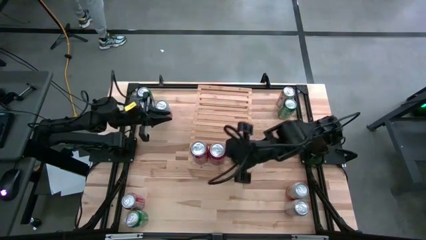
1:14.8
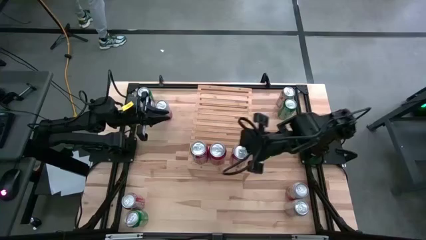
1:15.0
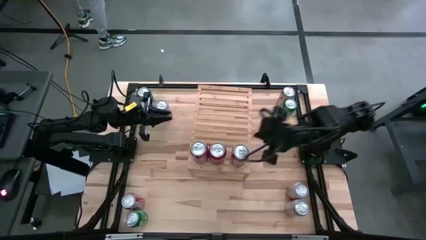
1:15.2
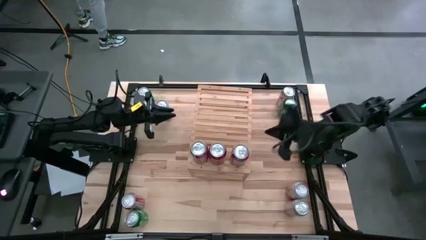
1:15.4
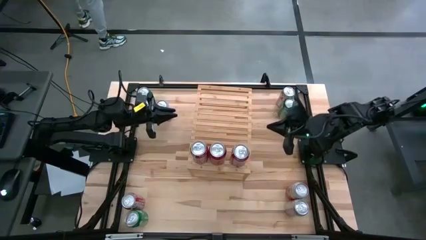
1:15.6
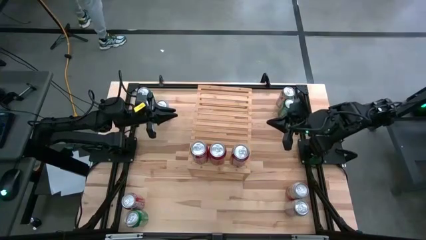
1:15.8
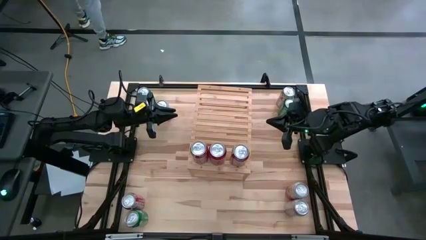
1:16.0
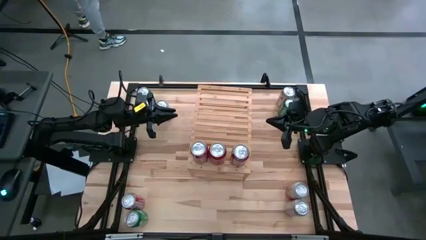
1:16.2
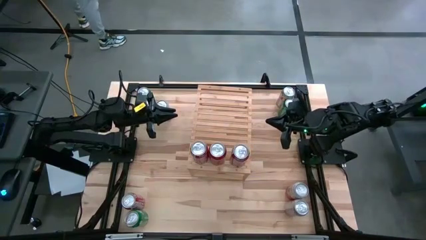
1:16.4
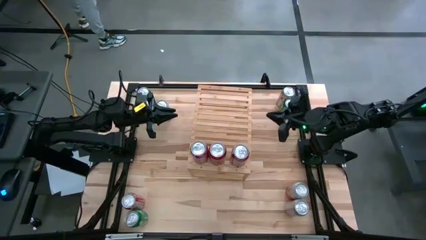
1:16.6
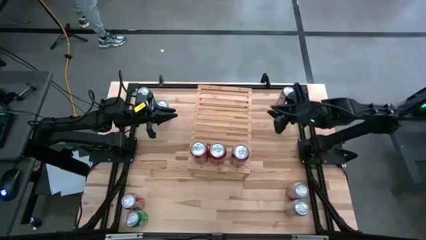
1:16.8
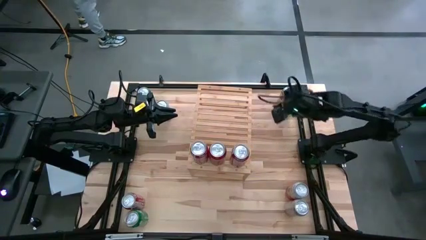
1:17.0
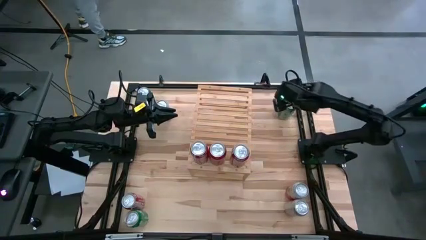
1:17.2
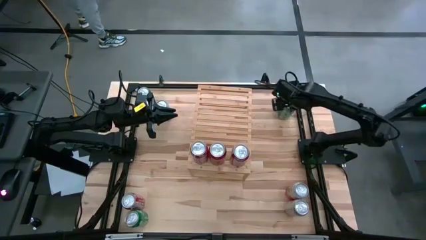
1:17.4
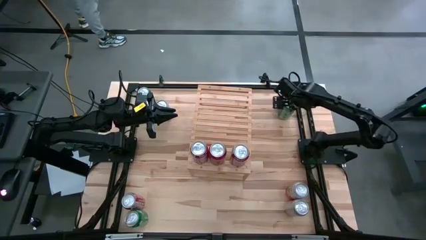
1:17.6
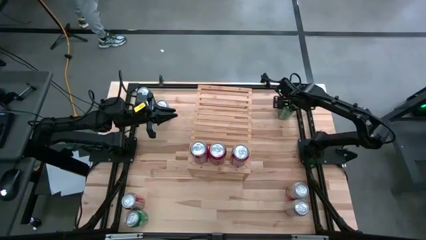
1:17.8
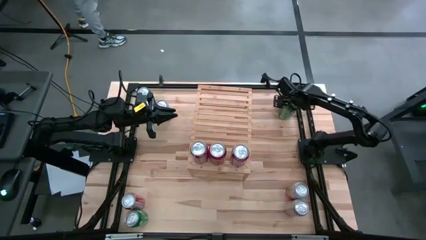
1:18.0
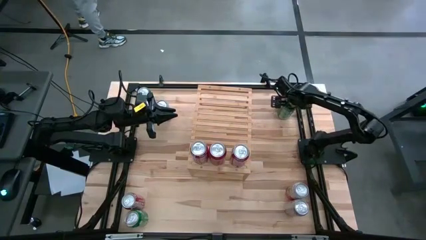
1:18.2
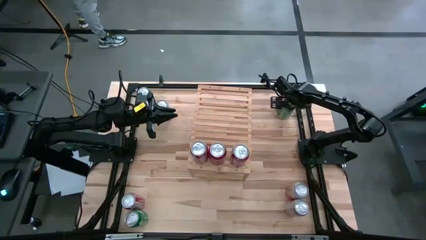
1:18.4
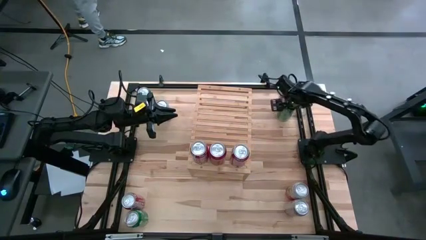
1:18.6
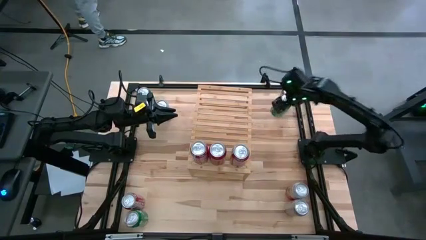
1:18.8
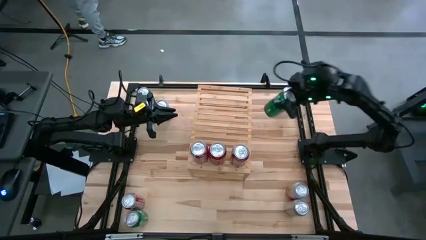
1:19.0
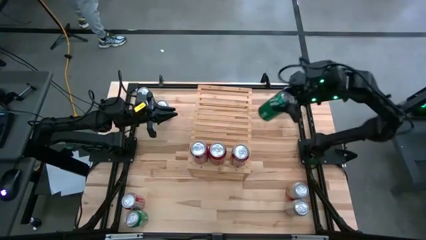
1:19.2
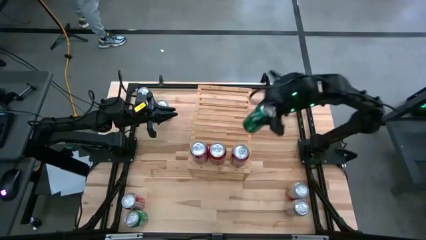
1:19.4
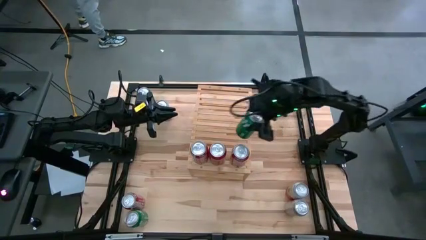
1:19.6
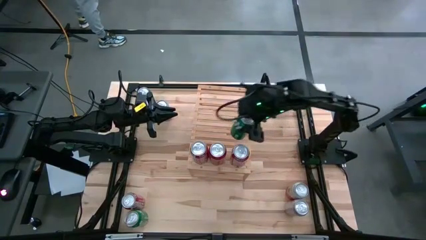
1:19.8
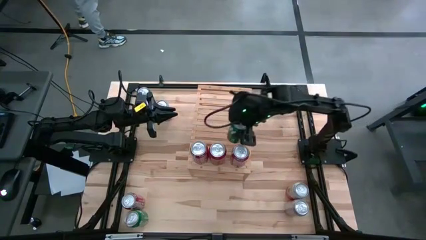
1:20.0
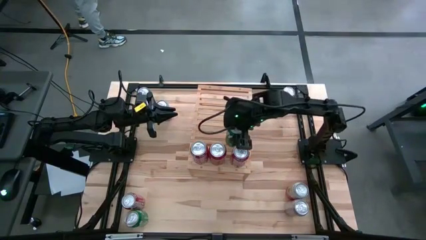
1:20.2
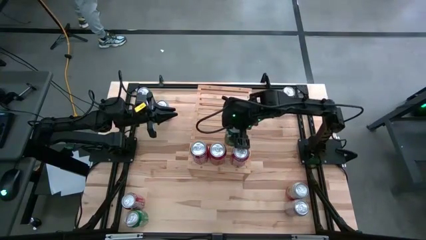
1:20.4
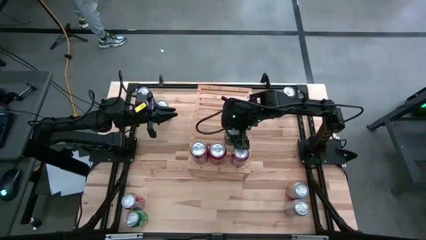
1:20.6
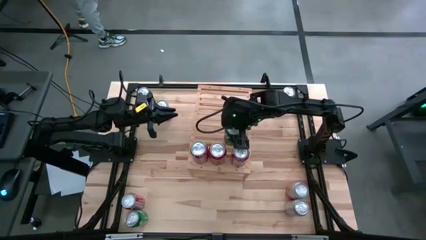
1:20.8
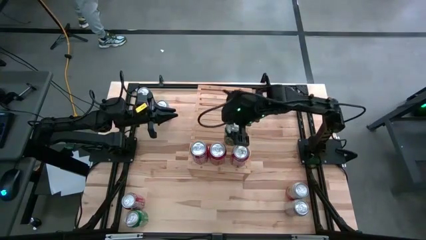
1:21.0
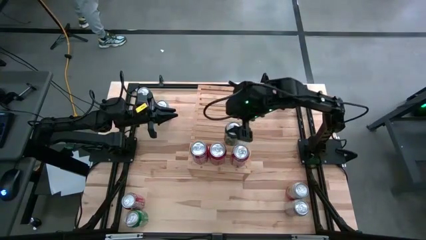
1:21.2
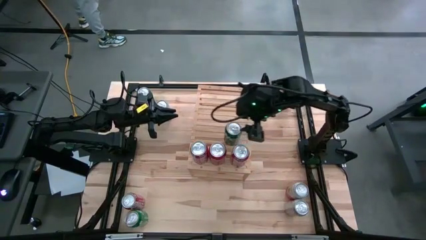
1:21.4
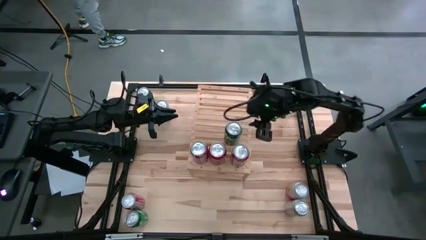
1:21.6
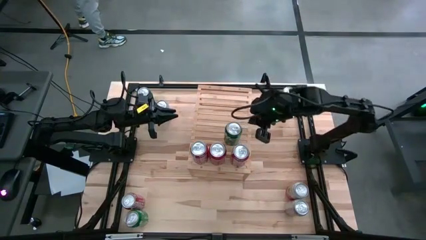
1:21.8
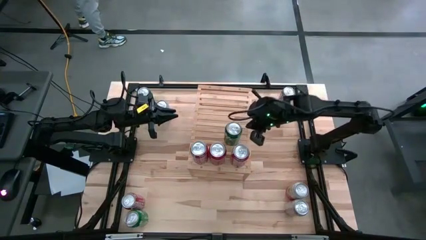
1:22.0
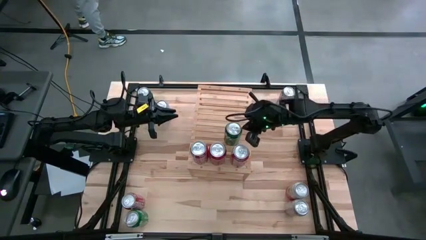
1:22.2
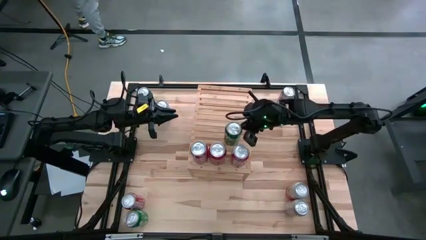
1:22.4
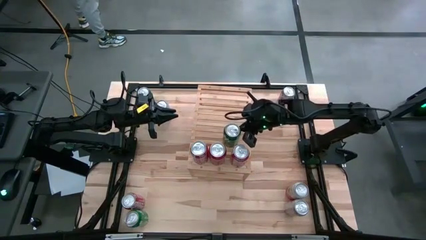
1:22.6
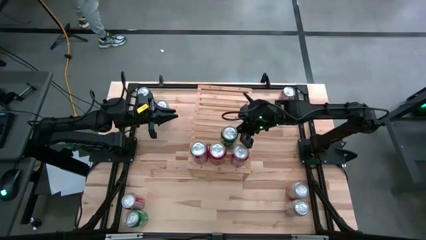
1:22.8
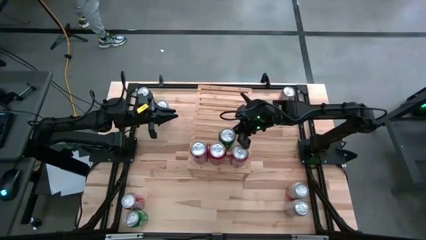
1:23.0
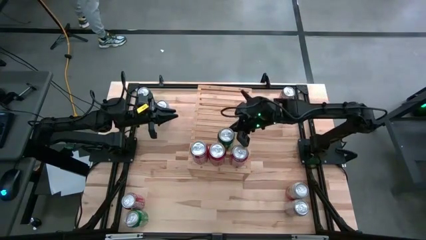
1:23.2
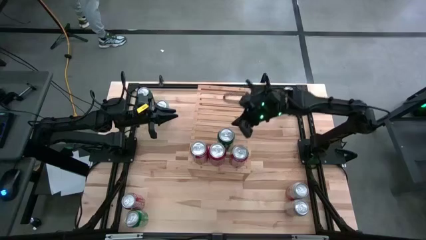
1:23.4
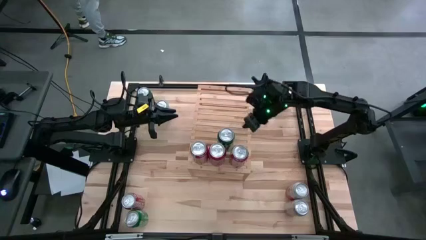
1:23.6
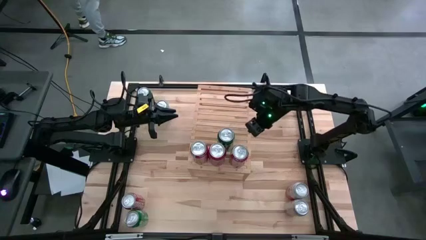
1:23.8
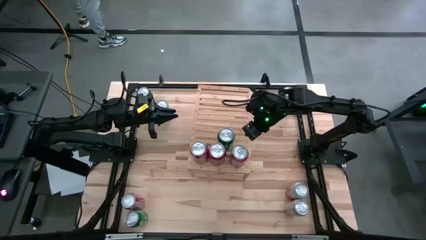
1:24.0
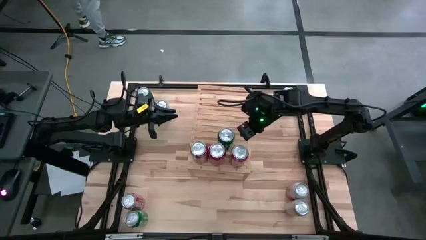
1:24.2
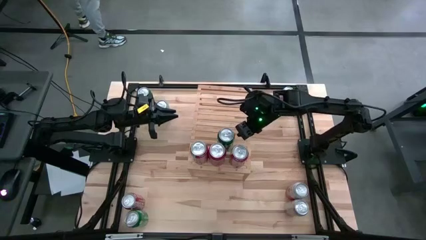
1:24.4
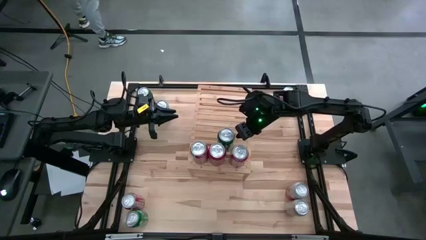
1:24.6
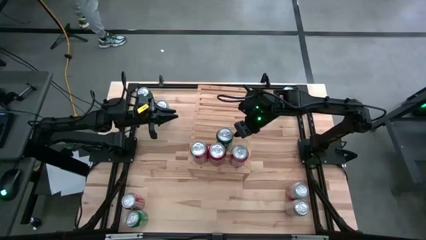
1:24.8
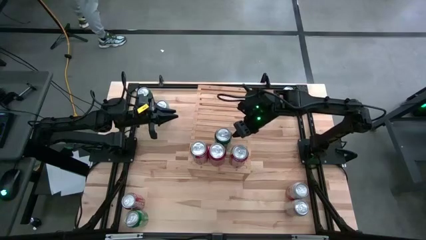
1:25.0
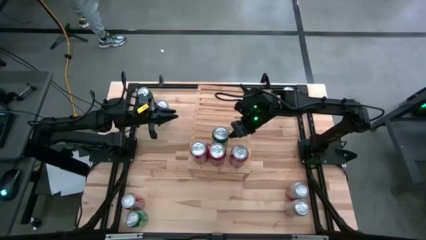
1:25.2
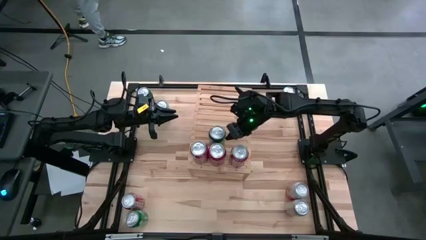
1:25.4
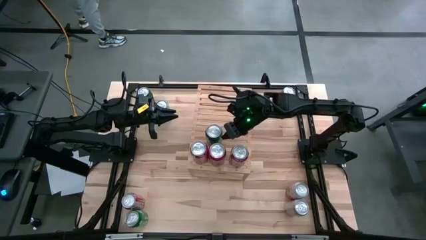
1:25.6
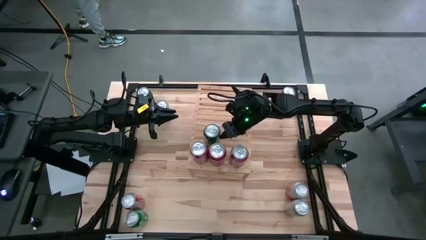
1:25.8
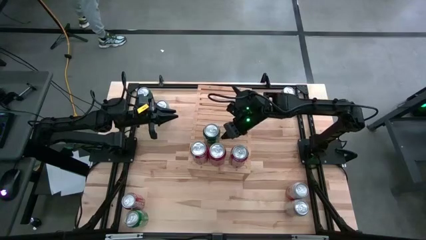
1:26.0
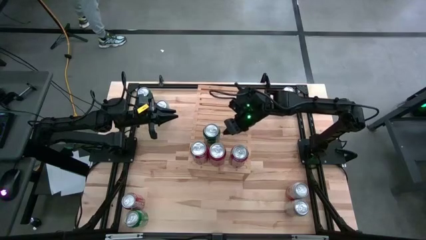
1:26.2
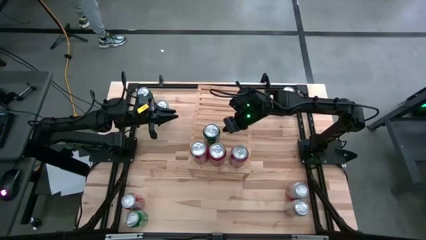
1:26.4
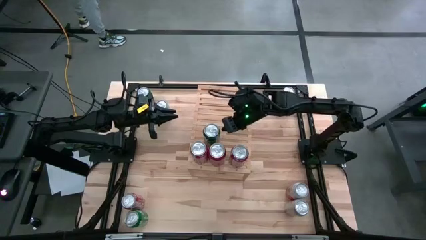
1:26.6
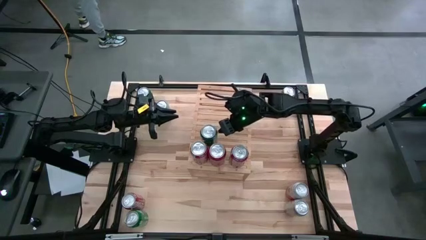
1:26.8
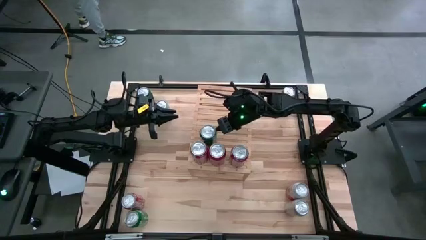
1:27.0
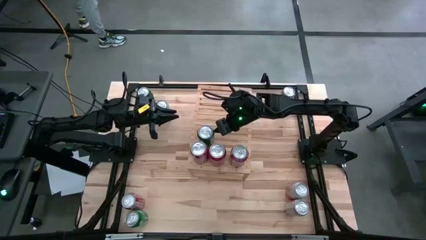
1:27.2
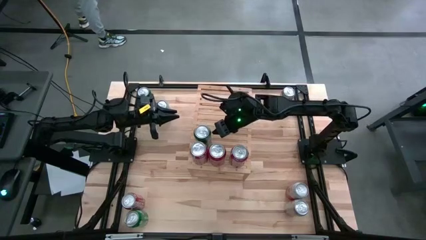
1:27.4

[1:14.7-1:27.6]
Task: Place canned beverage on shelf
Put the top right green soda can on the shelf

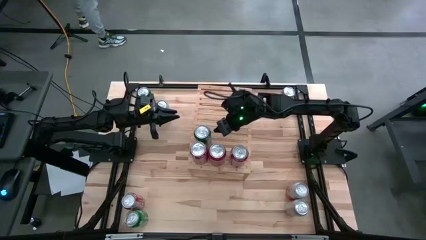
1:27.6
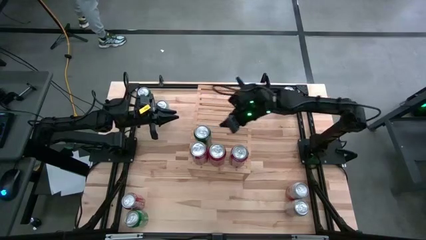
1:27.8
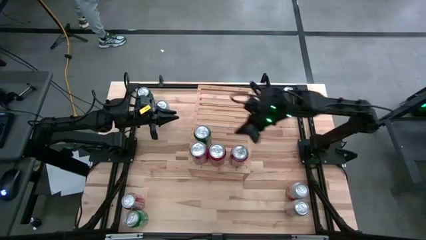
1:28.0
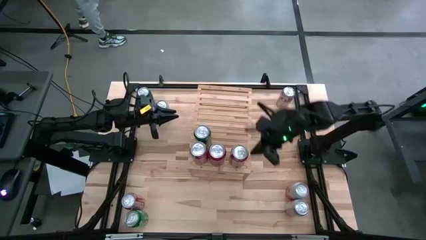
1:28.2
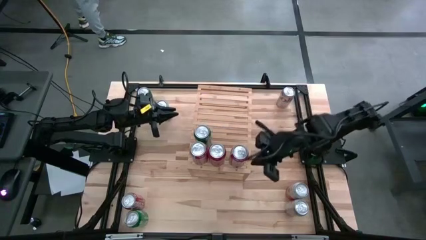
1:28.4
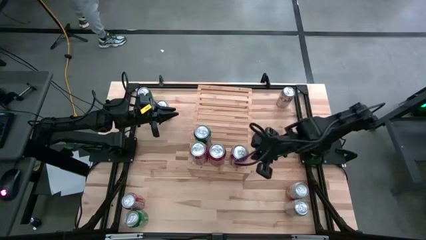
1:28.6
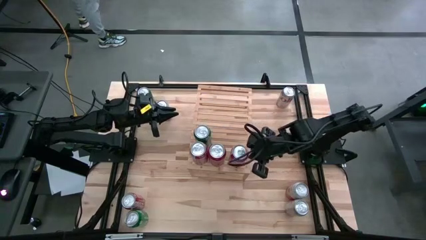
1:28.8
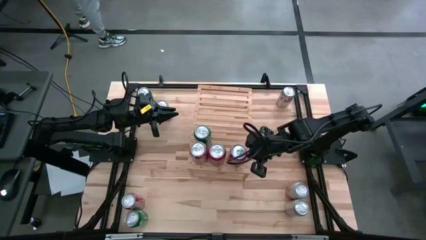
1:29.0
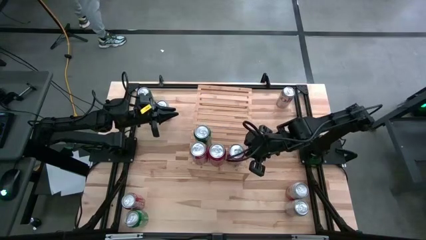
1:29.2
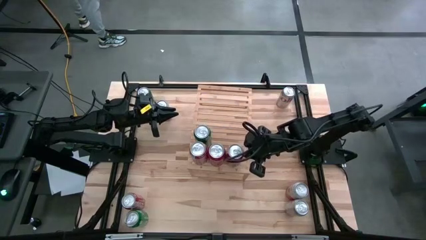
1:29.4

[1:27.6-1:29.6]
Adjust the right red soda can on the shelf
